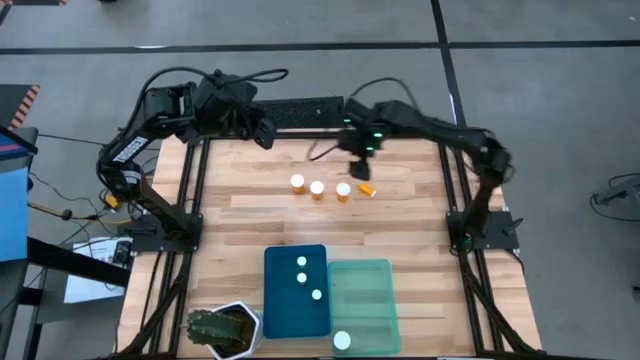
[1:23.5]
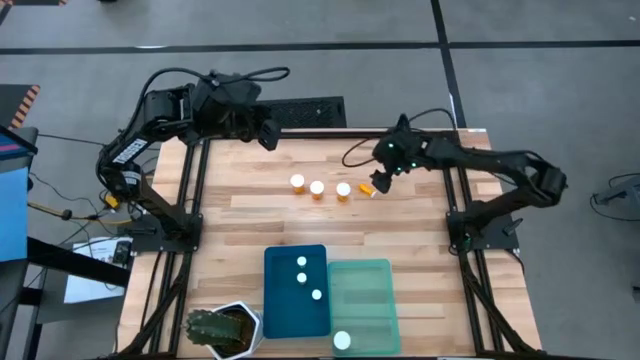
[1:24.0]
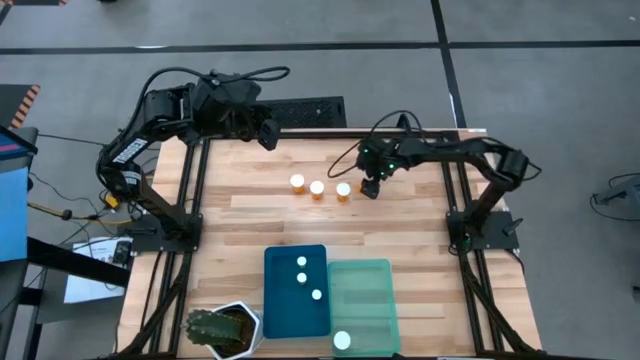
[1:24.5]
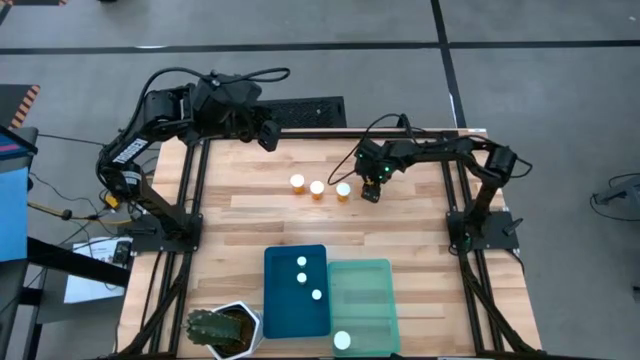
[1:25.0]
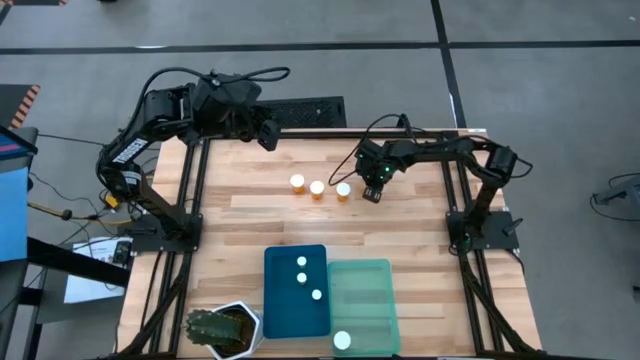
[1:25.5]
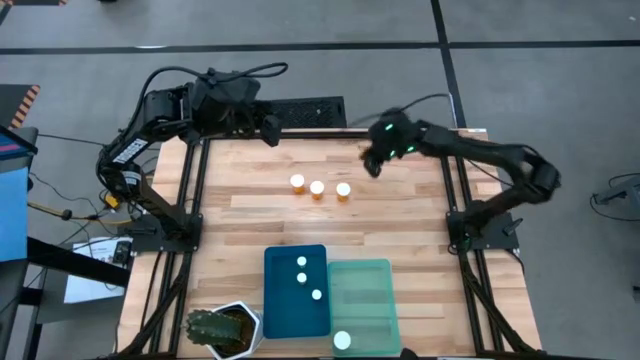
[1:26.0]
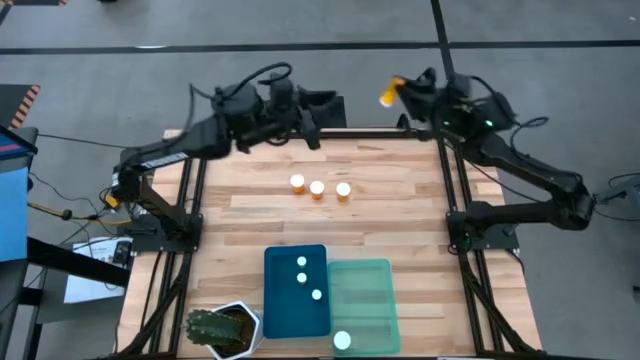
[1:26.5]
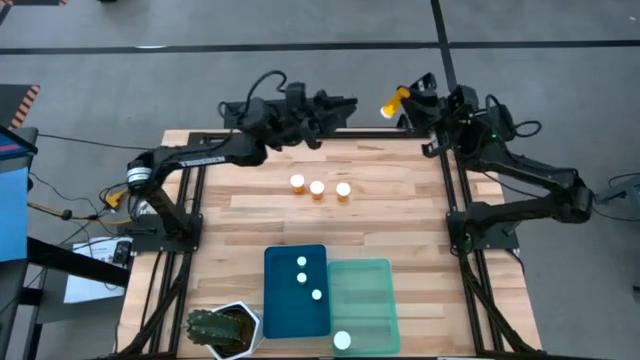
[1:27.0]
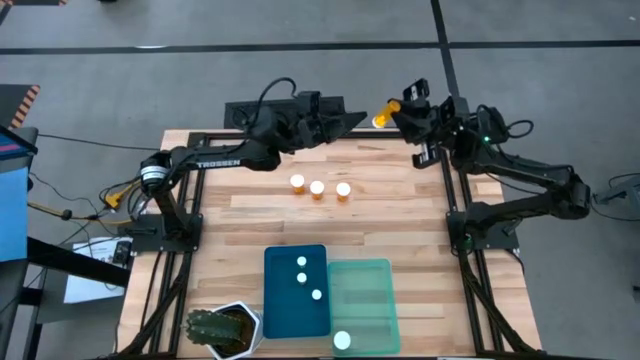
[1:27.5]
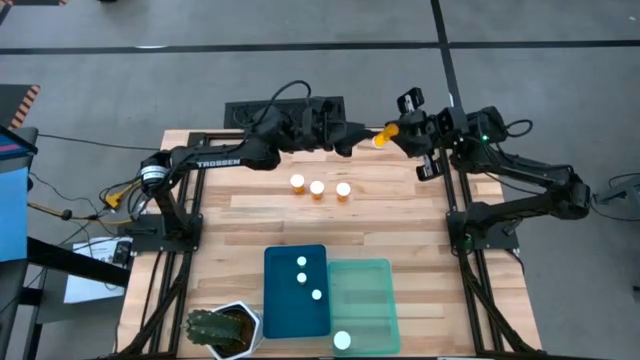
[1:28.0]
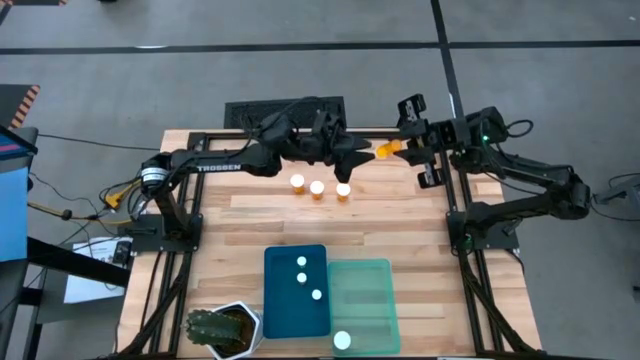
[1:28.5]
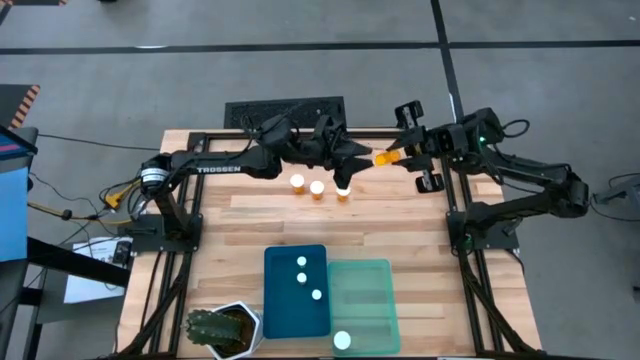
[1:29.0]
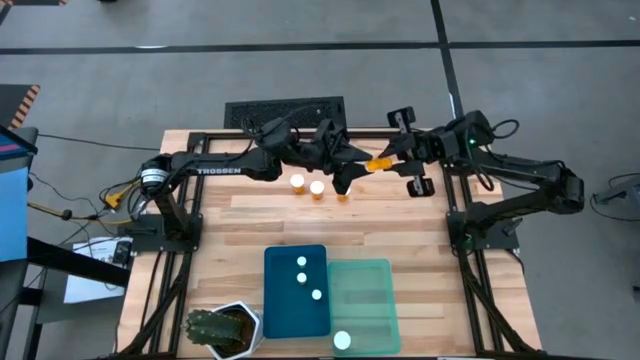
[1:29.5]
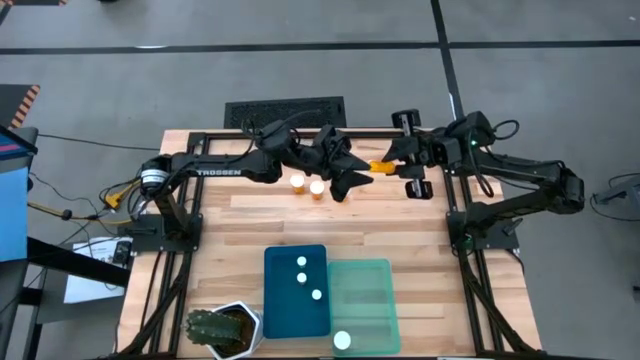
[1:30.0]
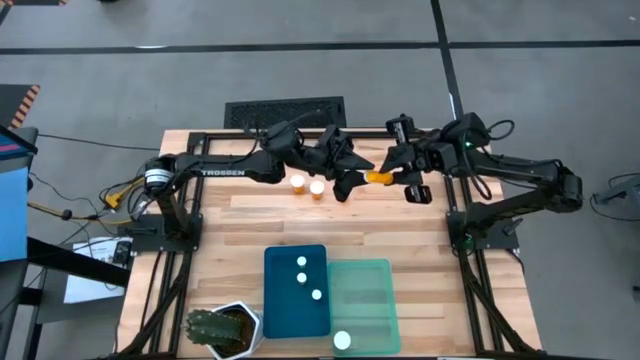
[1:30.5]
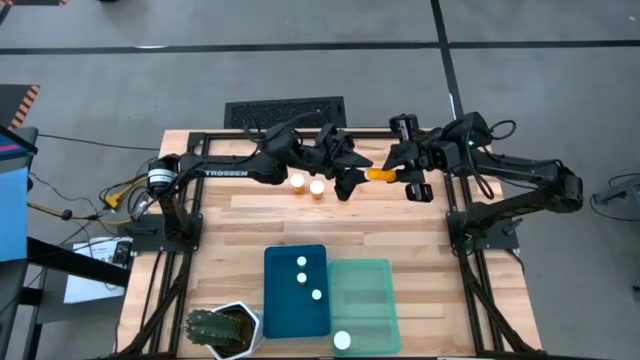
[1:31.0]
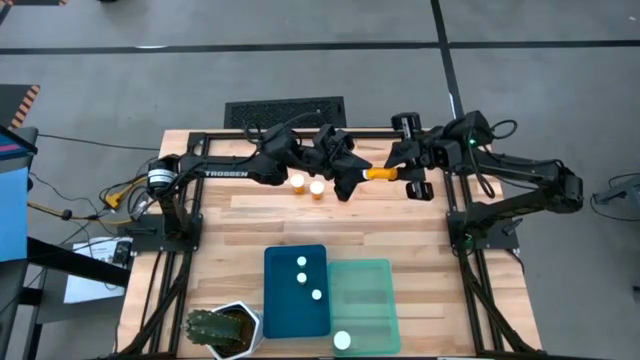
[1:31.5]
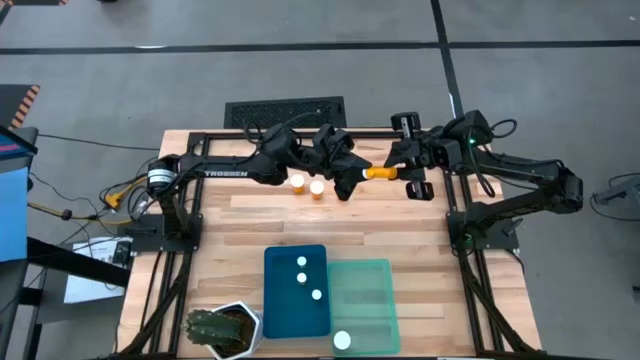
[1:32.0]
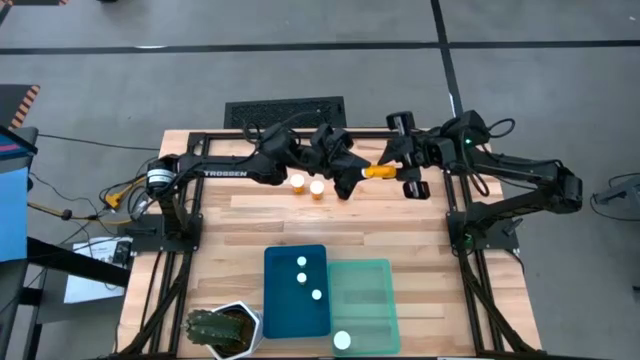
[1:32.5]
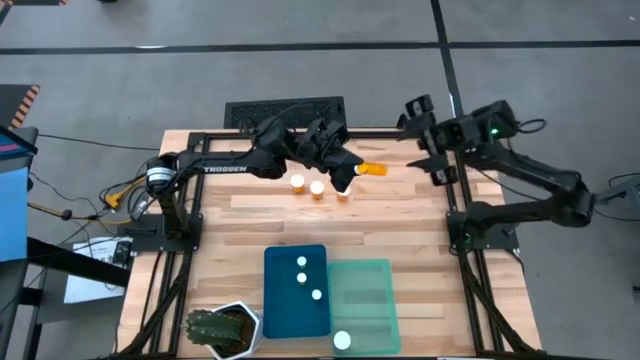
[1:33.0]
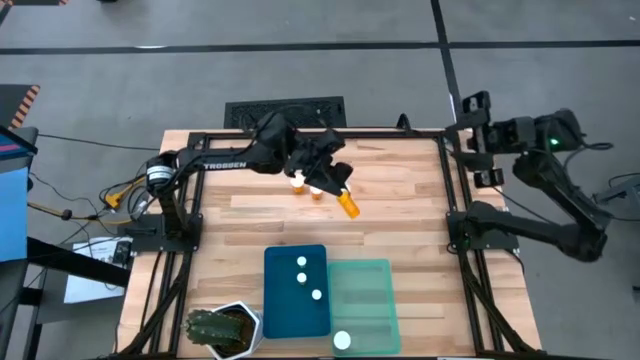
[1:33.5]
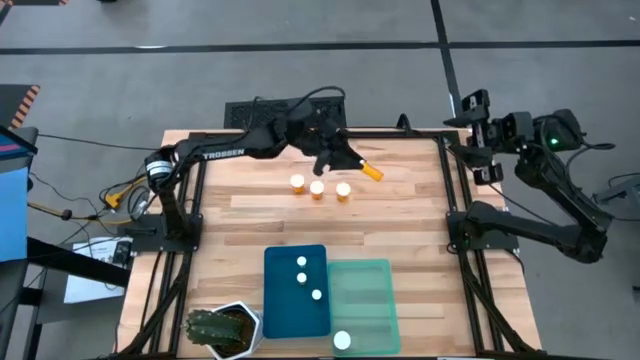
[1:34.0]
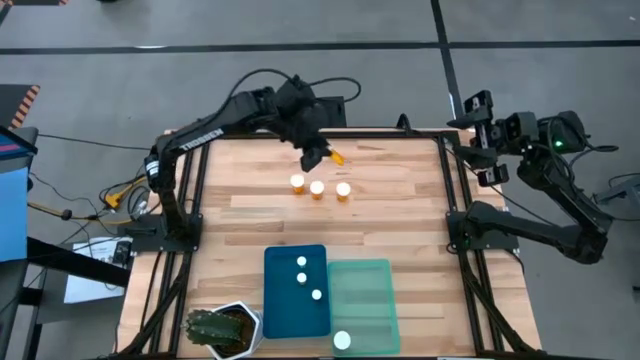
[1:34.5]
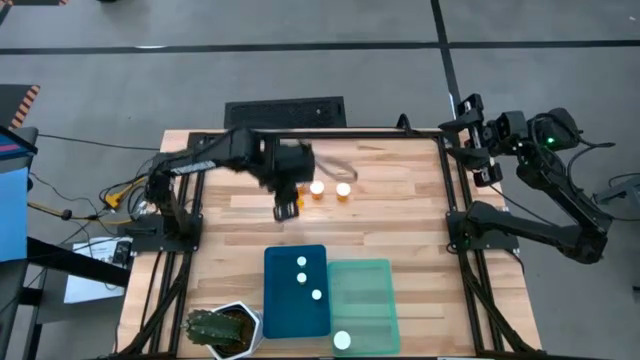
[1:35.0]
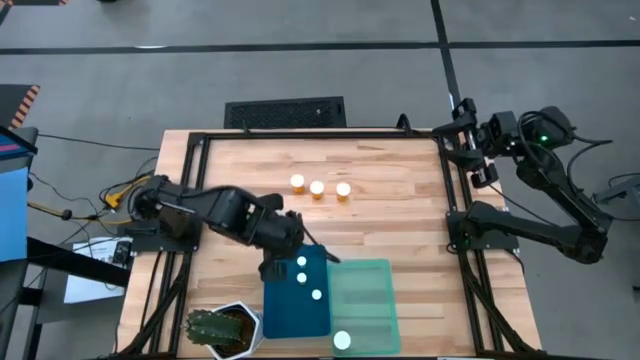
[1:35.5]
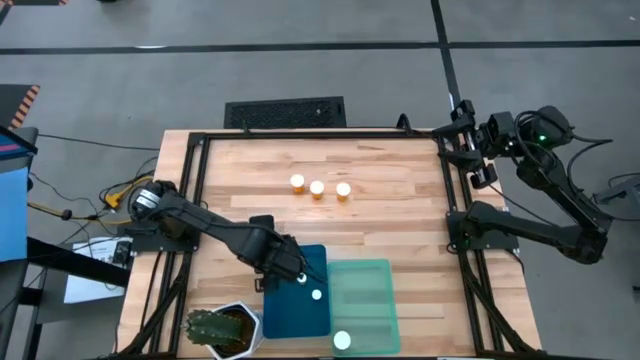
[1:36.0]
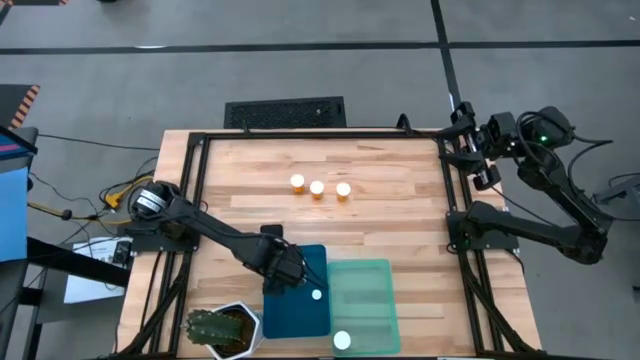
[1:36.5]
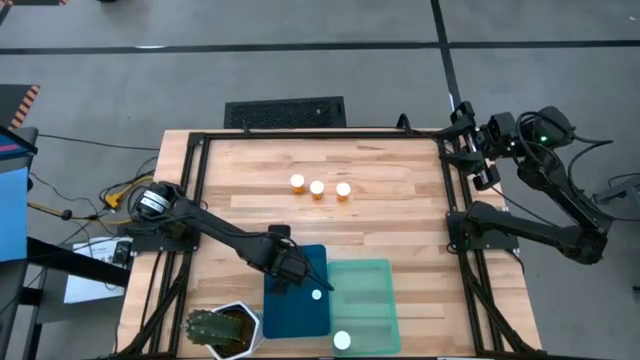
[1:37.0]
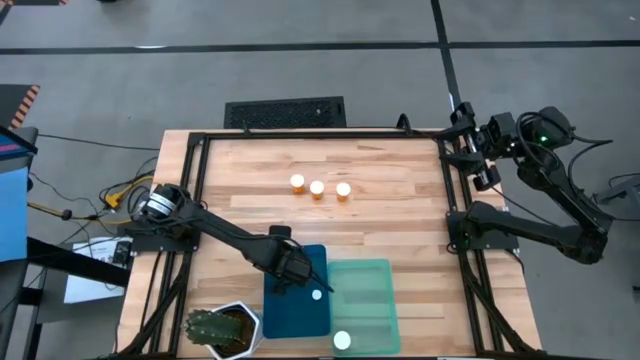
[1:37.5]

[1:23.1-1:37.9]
Task: Pick and place medicine bottles into bin by pill shape (circle, oval)
Put the small orange pill bottle into the blue bin

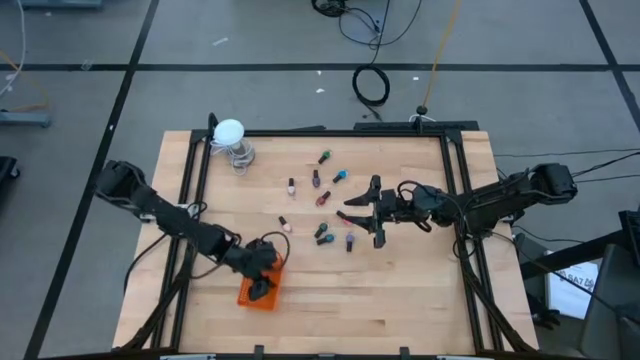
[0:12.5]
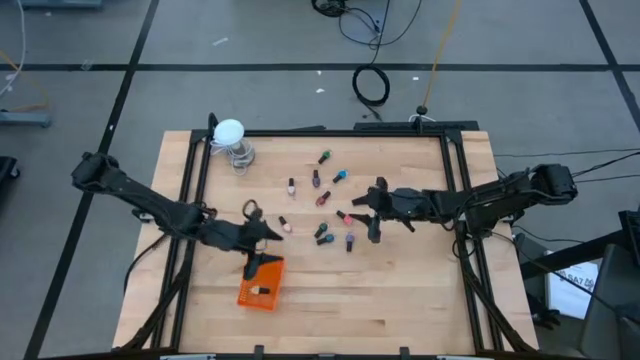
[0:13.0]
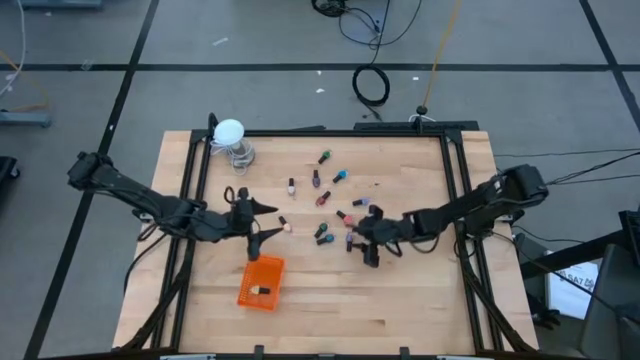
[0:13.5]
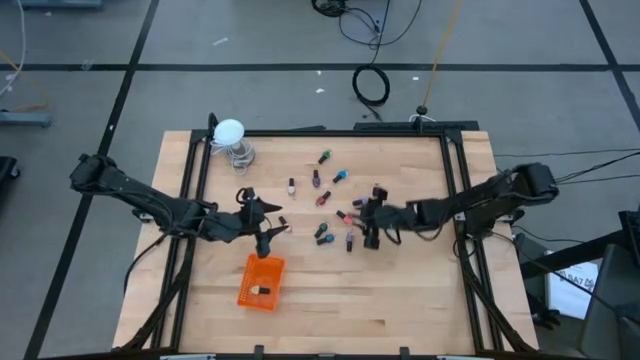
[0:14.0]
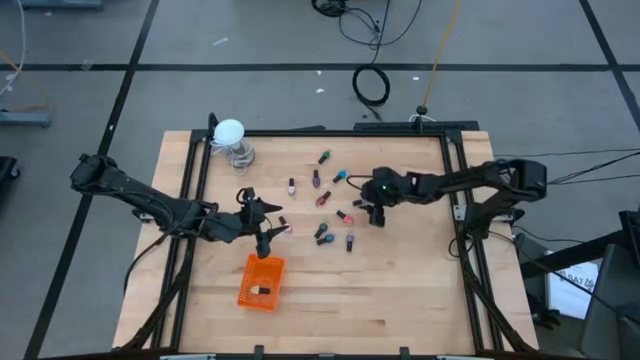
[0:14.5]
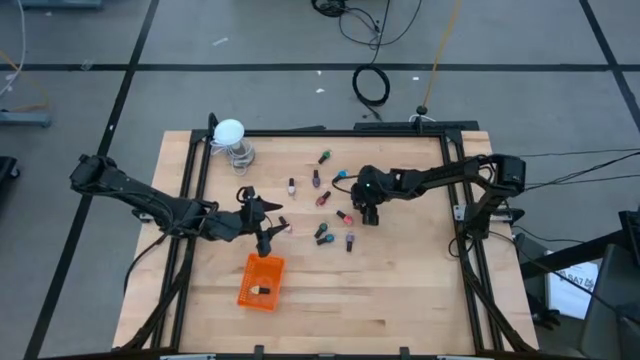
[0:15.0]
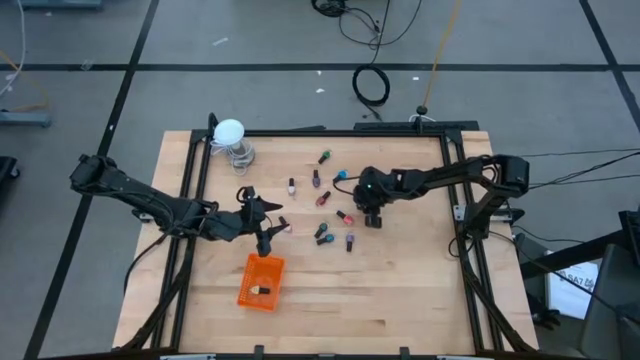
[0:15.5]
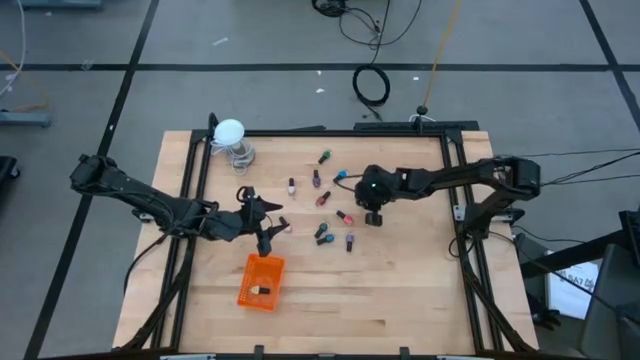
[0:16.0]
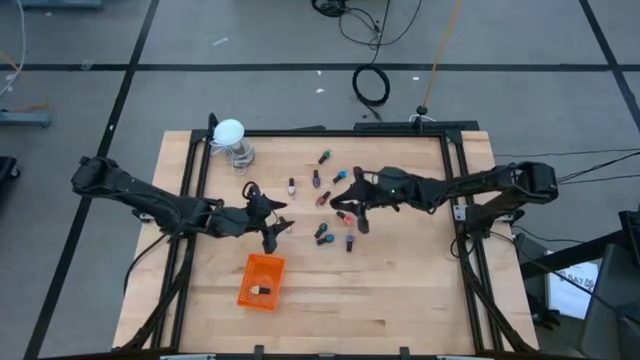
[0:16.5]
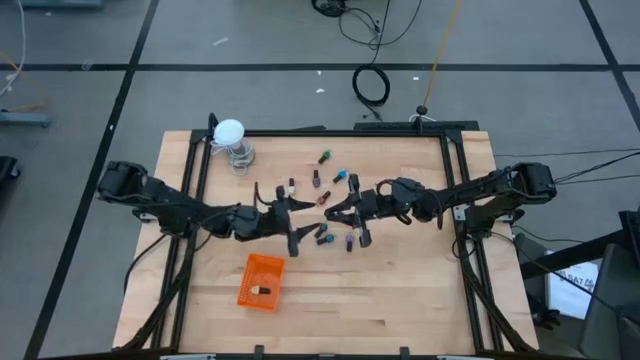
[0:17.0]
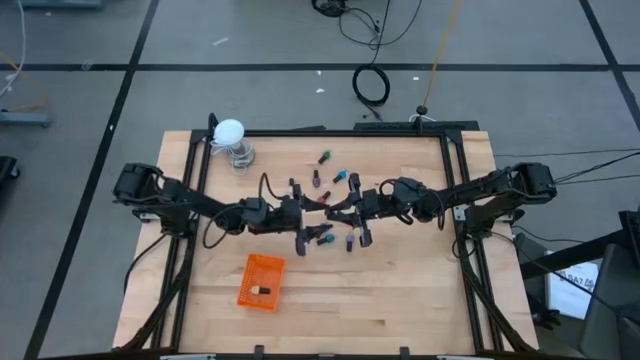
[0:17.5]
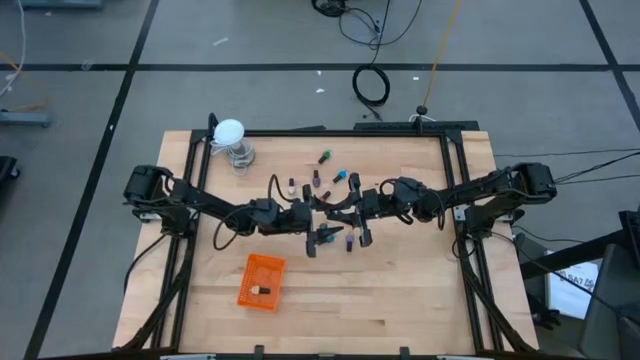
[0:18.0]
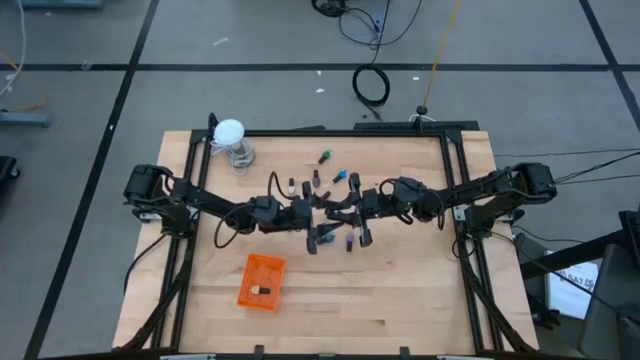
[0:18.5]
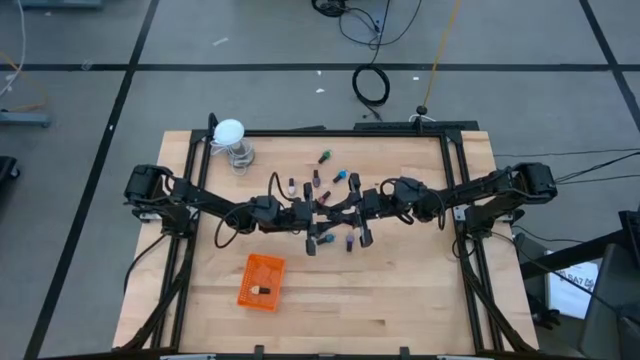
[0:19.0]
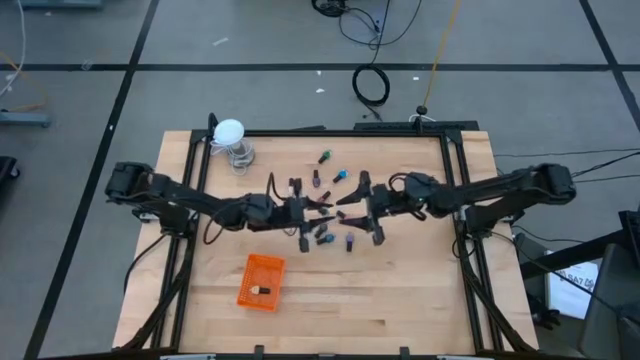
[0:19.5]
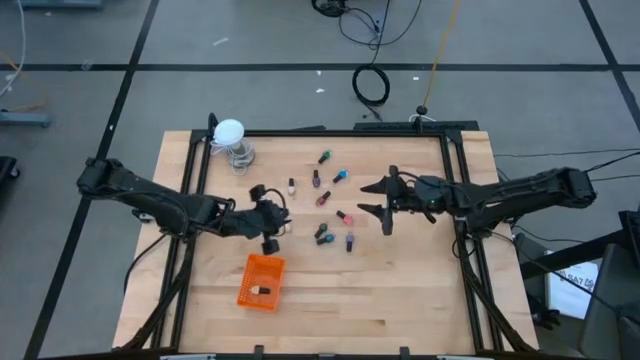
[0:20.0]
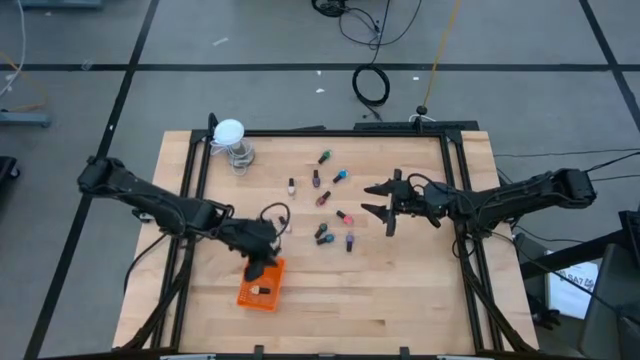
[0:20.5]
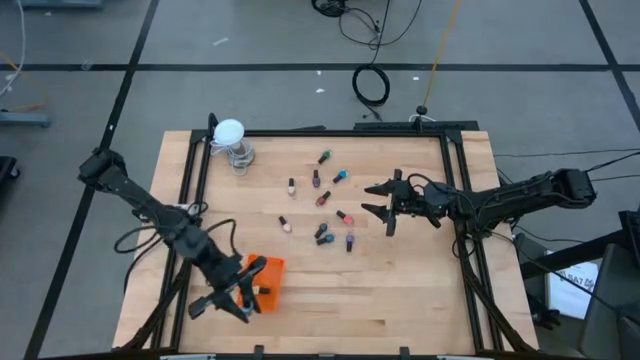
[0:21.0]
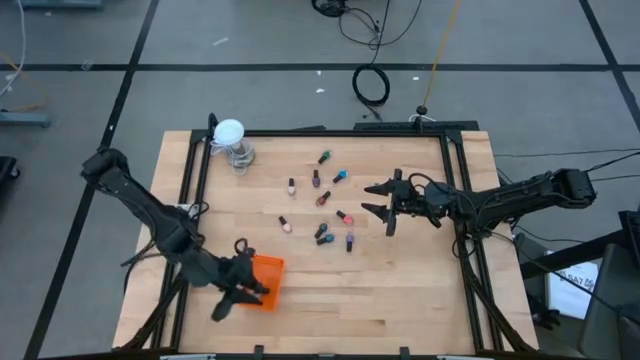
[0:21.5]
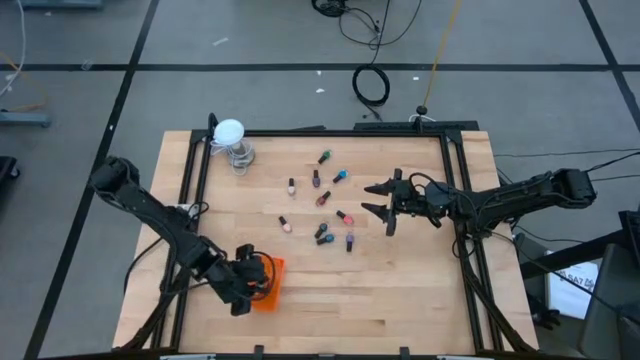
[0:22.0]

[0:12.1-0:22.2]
Task: Pick & Place Nail Polish
Put the middle blue nail color bottle into the orange bin
